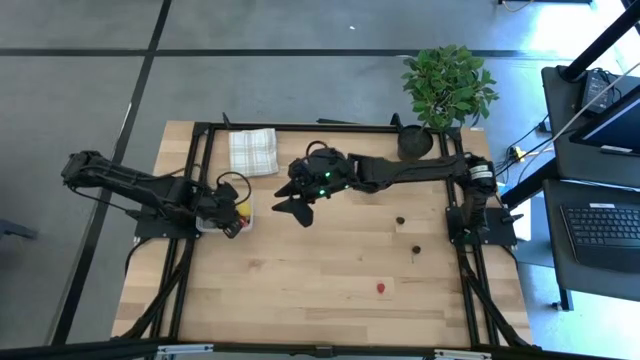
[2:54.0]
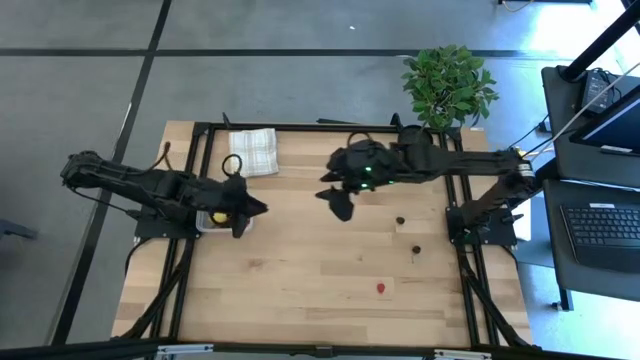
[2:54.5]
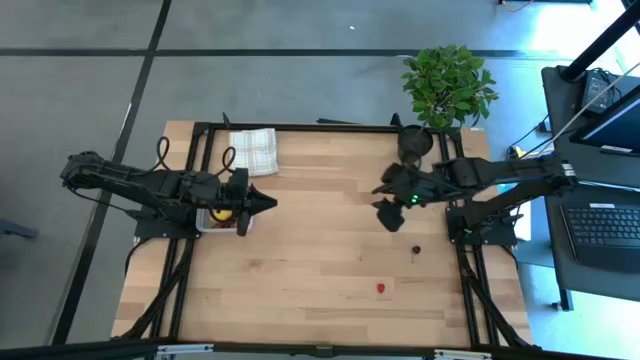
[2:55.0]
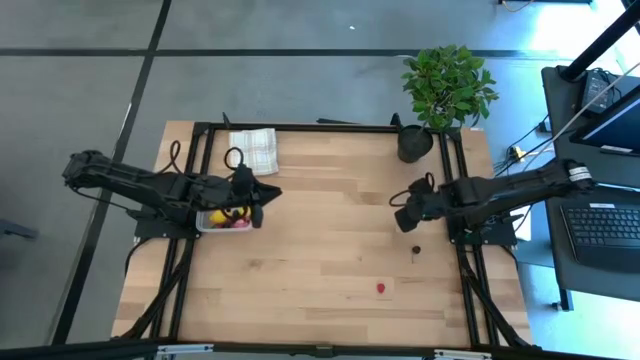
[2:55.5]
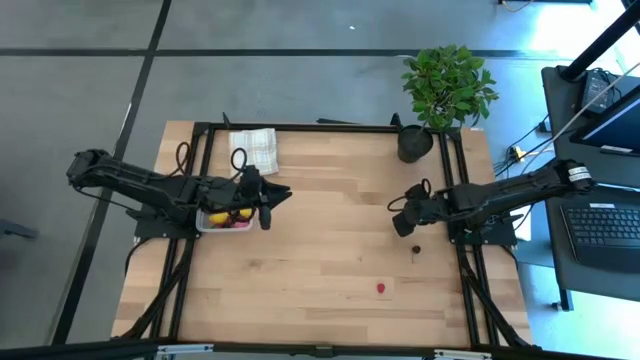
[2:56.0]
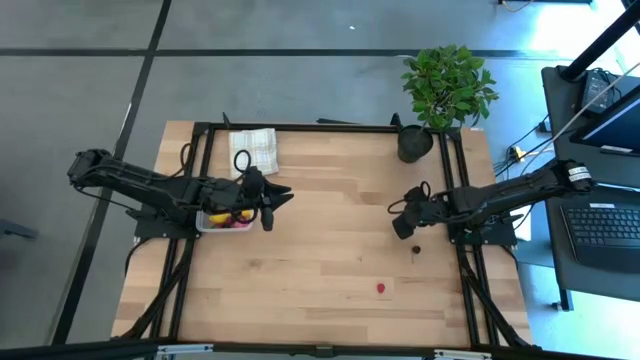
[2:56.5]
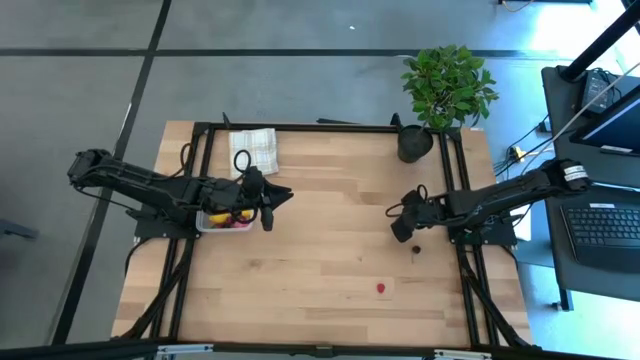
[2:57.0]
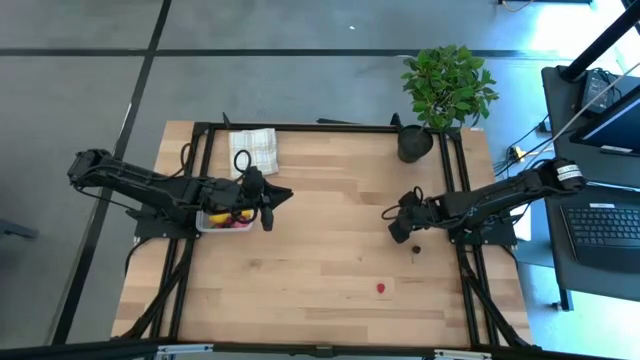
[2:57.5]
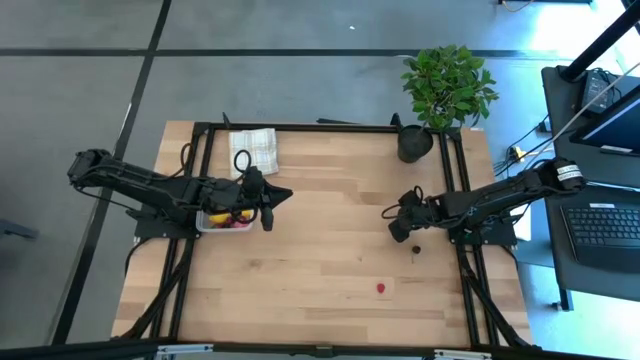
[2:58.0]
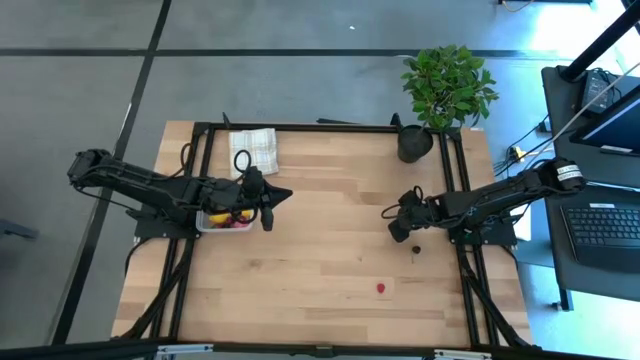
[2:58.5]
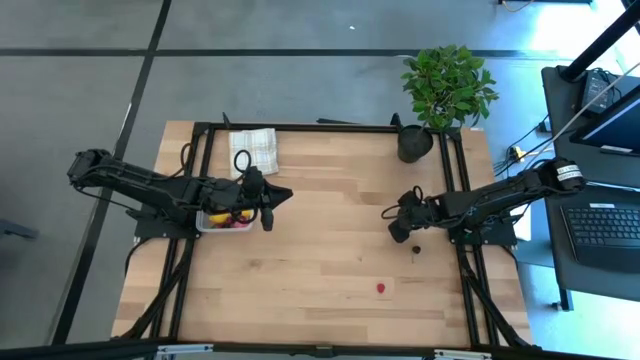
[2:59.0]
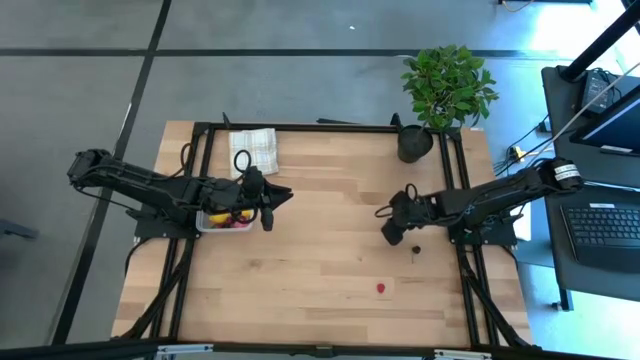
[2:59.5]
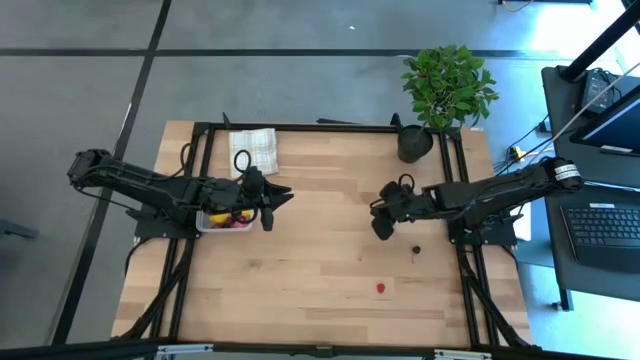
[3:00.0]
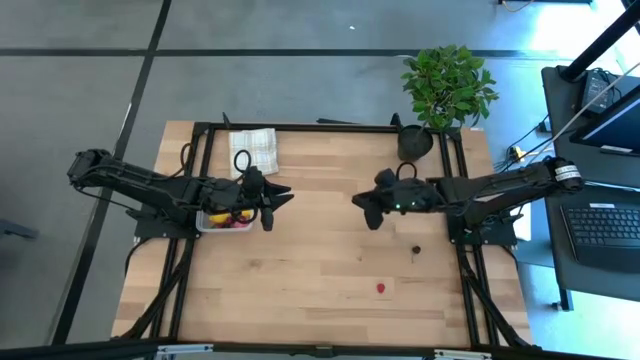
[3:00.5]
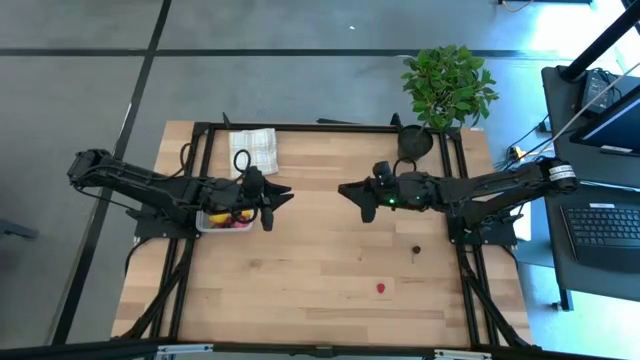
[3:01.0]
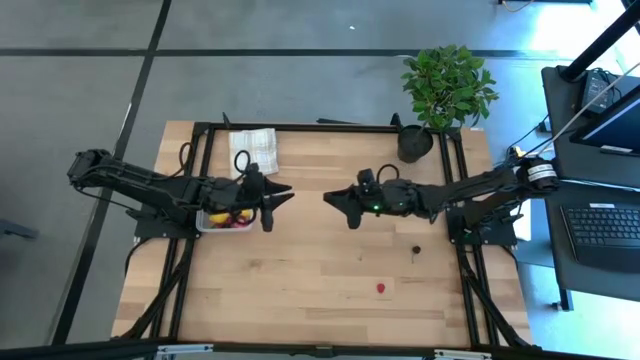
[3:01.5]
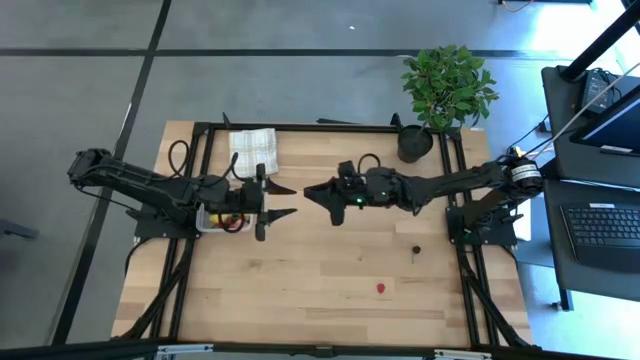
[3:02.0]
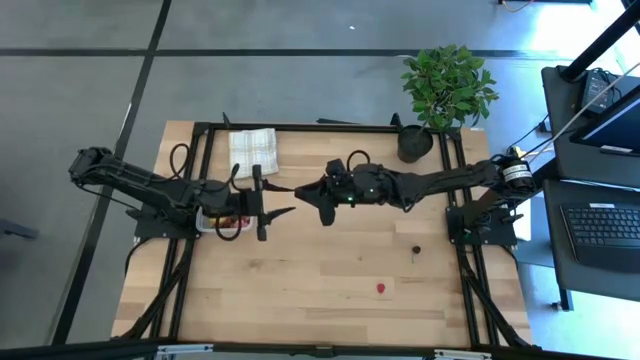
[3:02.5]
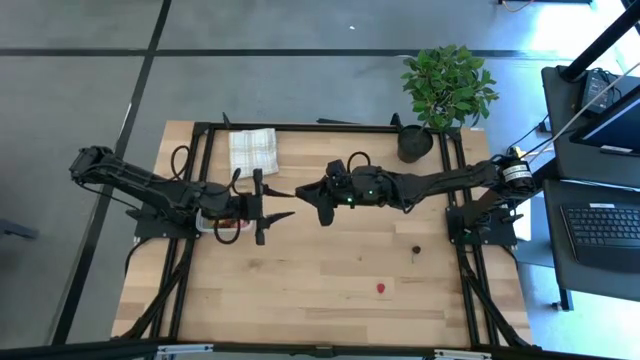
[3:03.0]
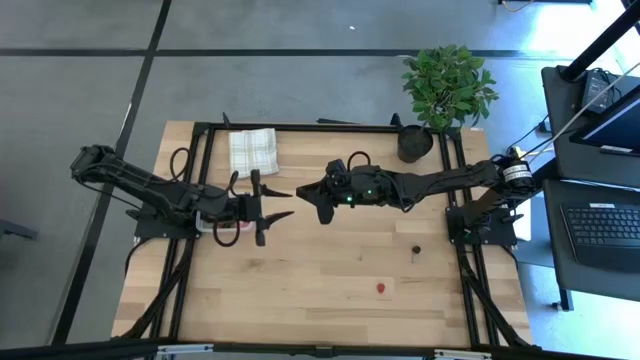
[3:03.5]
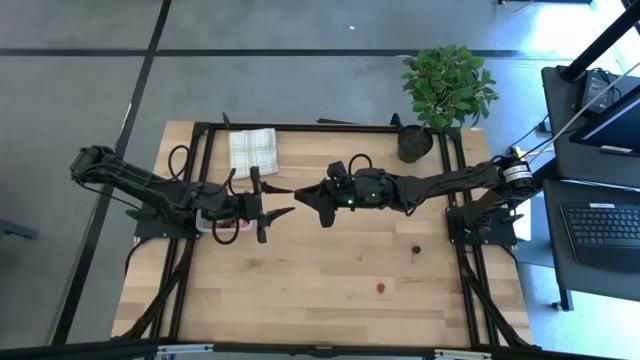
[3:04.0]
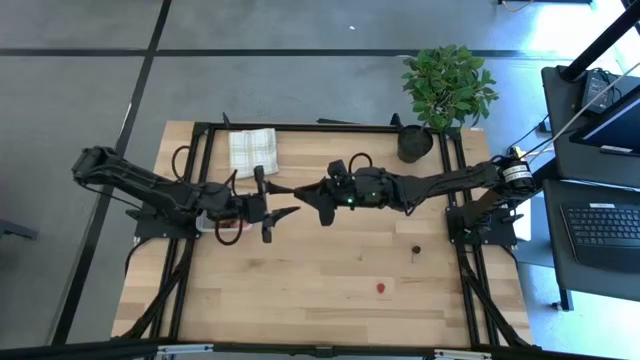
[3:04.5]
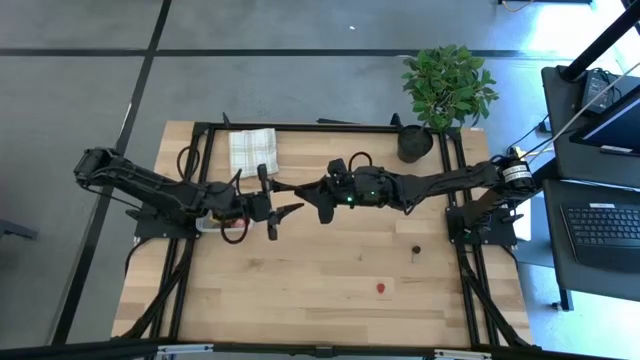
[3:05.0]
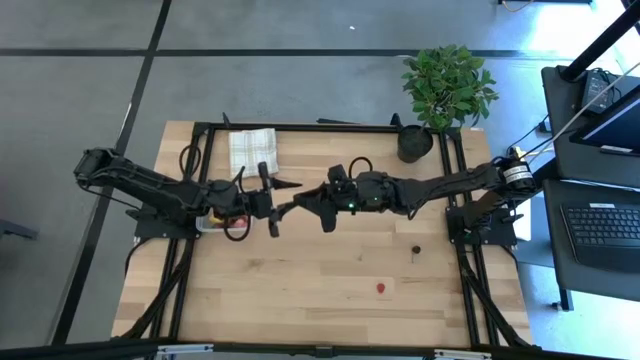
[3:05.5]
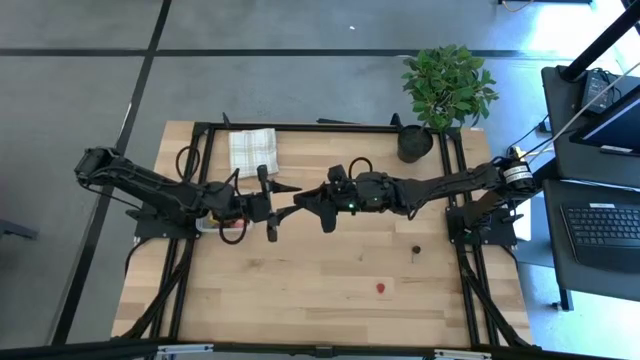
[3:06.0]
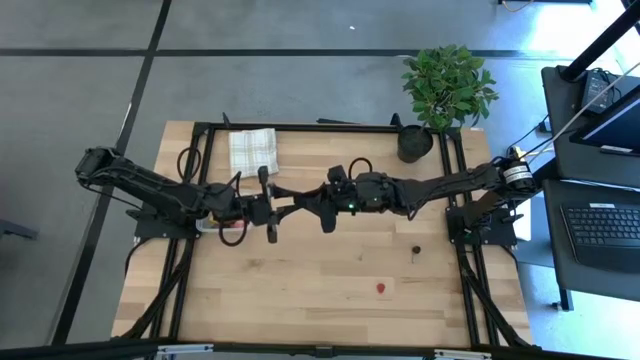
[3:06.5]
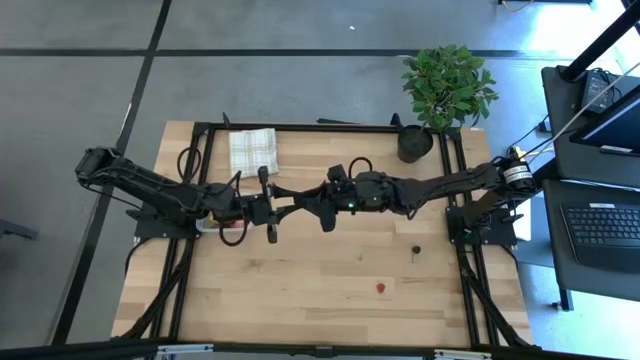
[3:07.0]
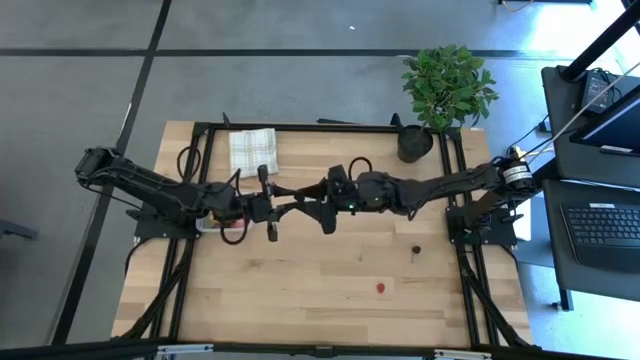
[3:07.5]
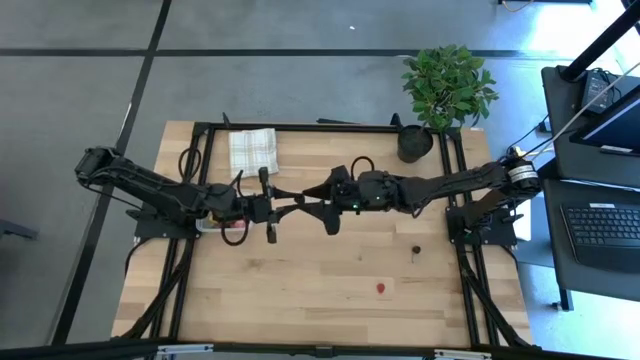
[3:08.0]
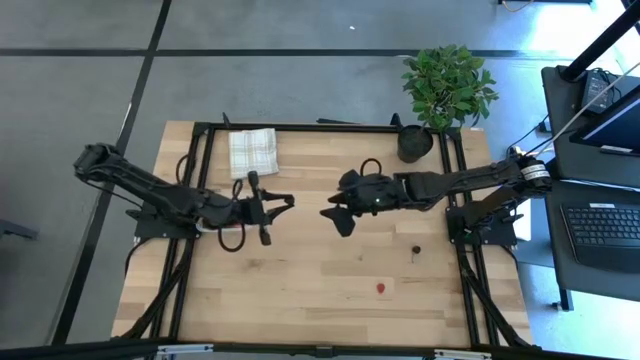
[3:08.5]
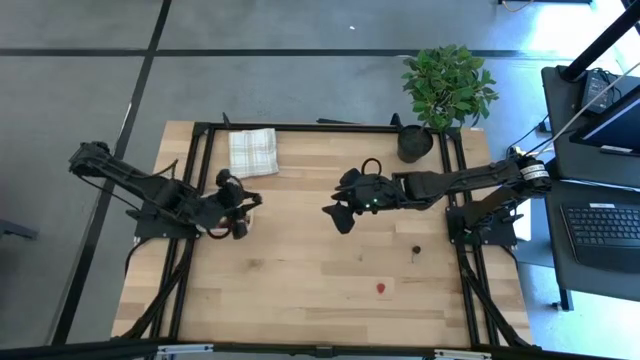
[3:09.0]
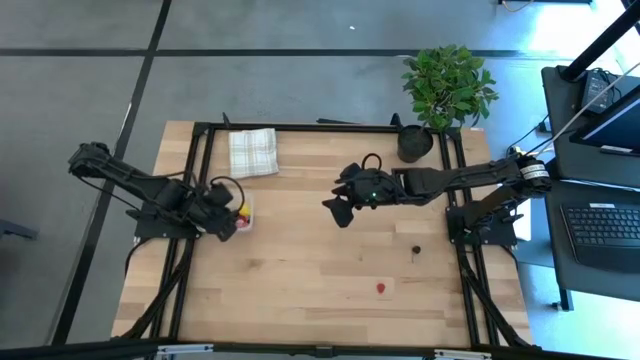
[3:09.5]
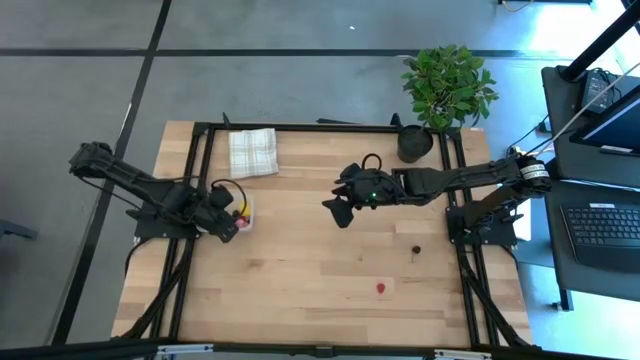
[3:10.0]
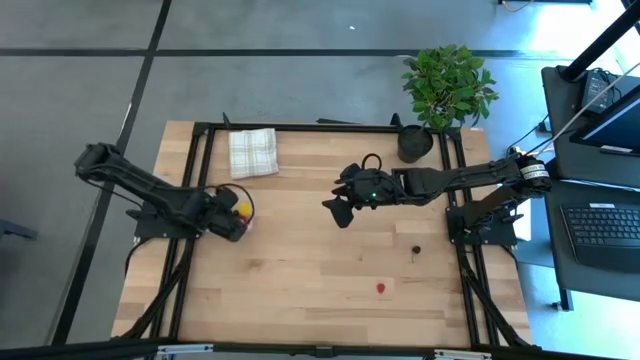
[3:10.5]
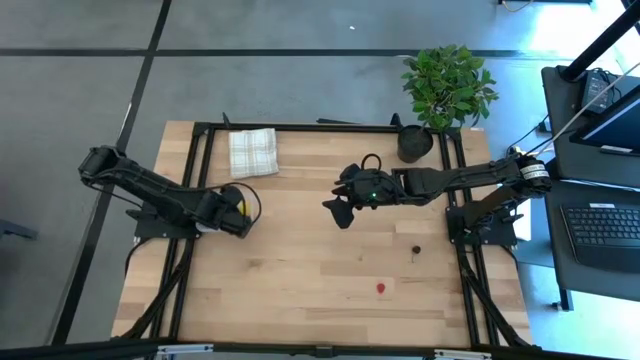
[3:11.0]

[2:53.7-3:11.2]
Task: Pick and placing Produce into tupperware
Put the black berry into the transparent bin

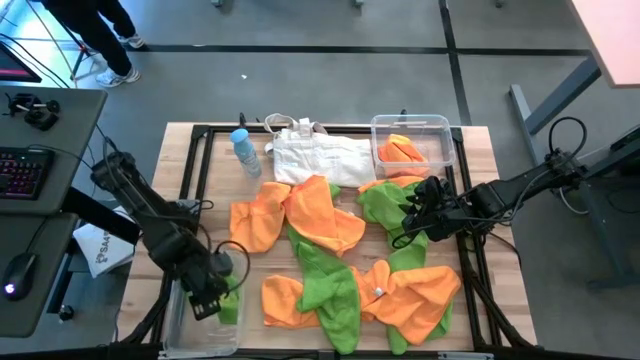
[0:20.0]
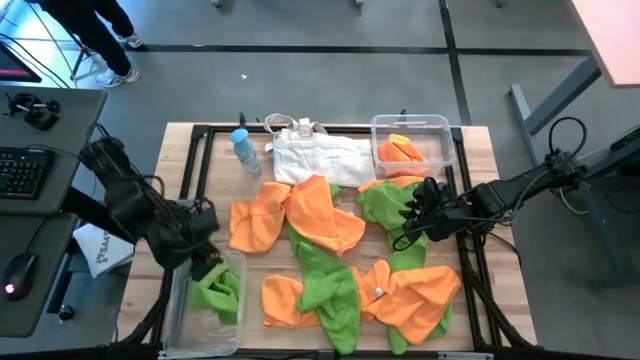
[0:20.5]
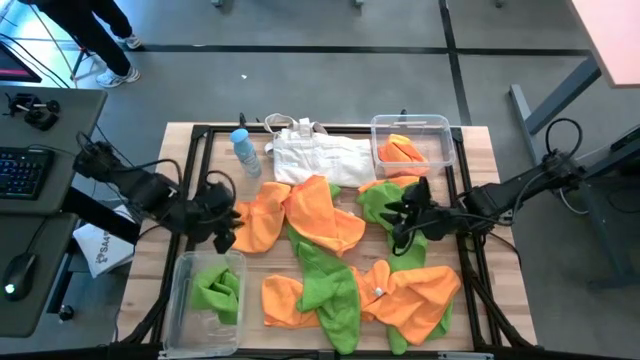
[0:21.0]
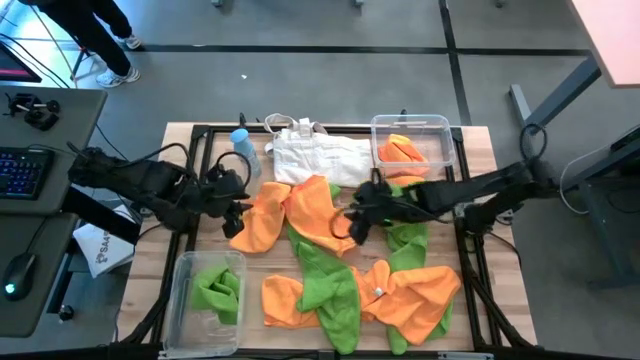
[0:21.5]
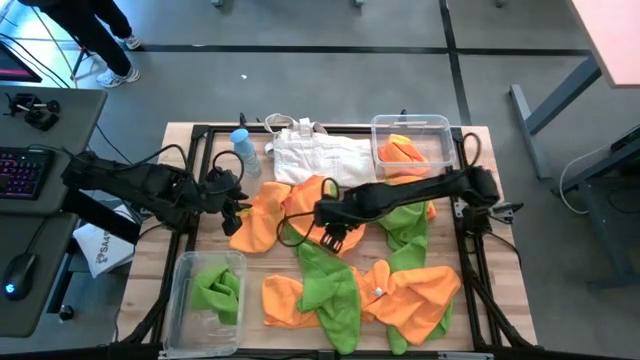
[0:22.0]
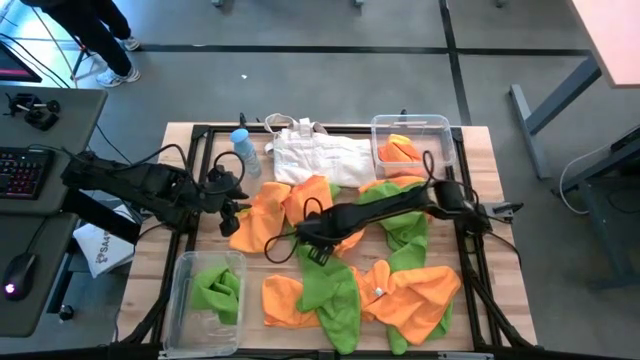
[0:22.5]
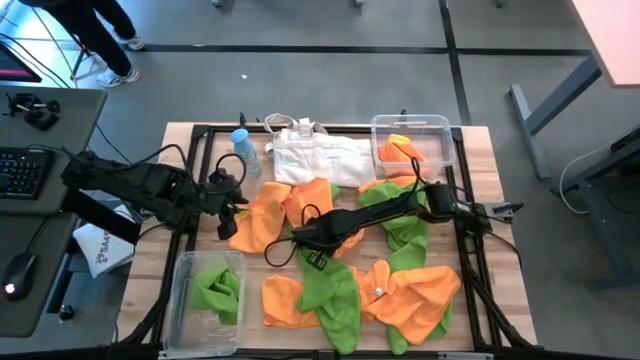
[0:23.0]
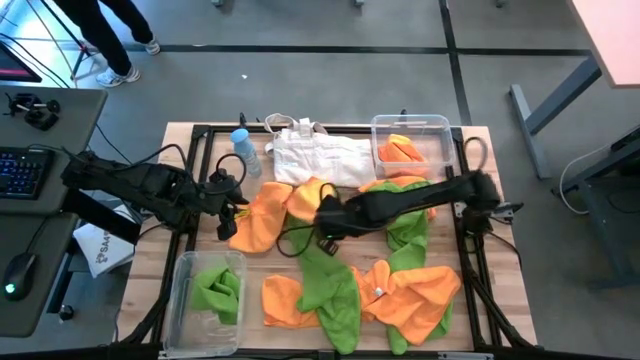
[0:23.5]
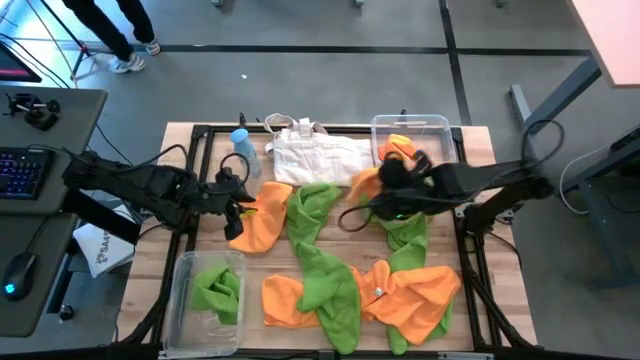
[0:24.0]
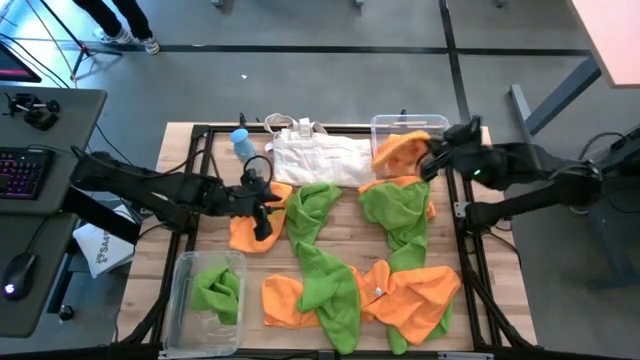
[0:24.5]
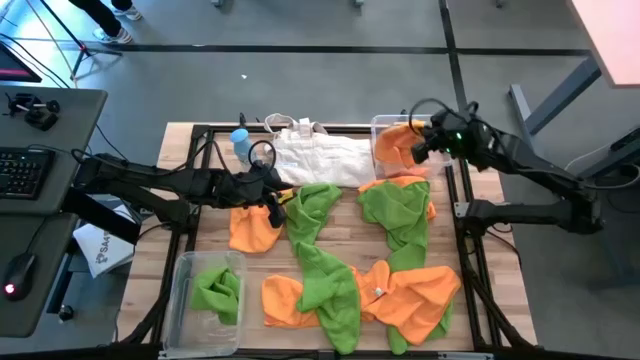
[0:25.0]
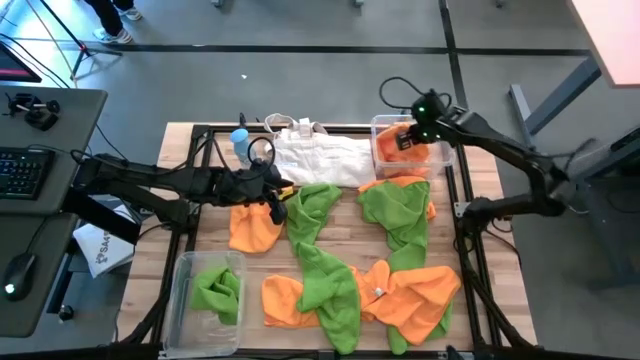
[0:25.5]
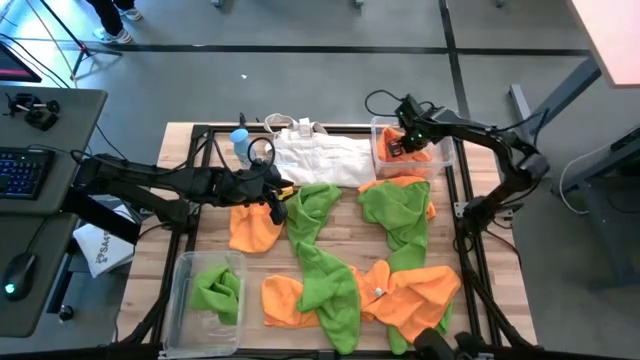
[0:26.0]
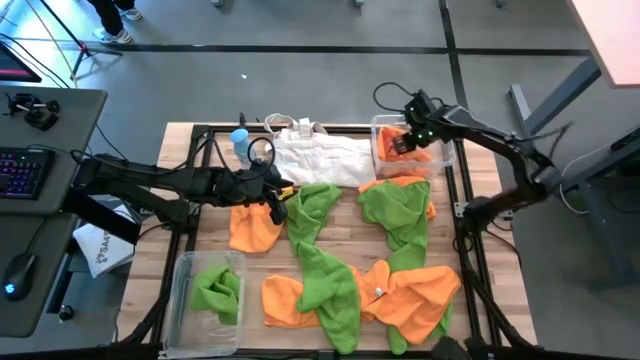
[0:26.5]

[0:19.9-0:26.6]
Task: Sort microfiber towel by color & place in baskets
Put the orange microfiber cloth into the top transparent bin
